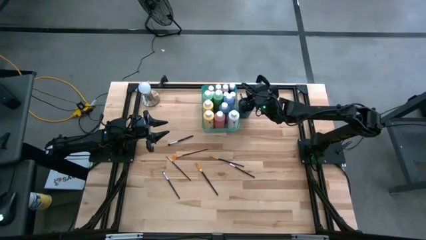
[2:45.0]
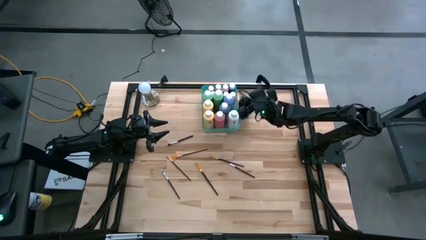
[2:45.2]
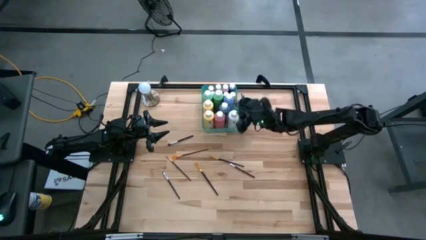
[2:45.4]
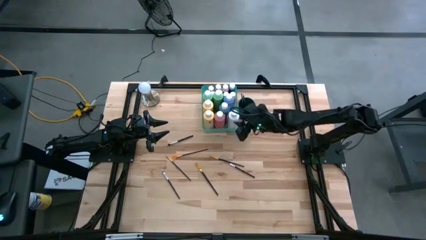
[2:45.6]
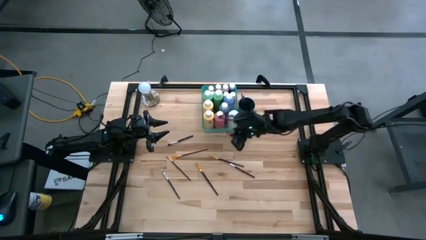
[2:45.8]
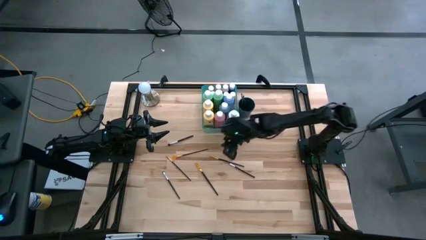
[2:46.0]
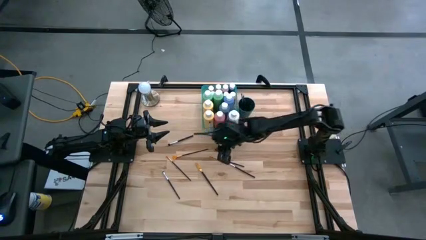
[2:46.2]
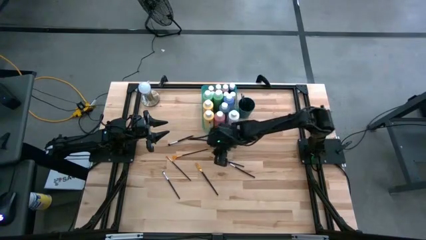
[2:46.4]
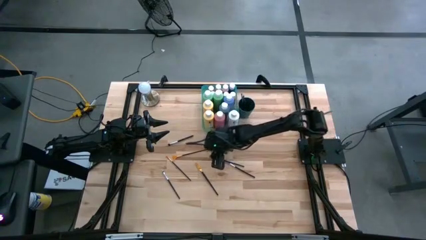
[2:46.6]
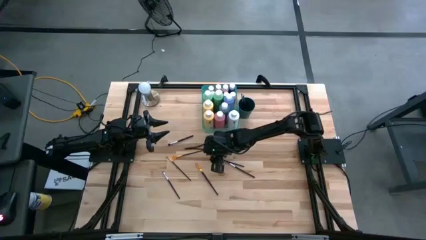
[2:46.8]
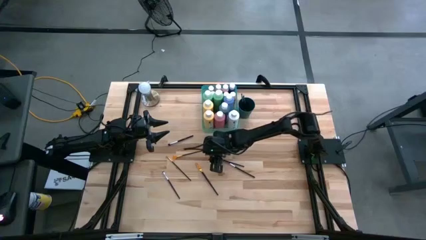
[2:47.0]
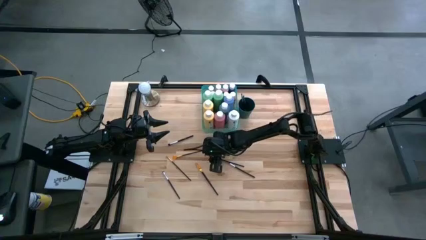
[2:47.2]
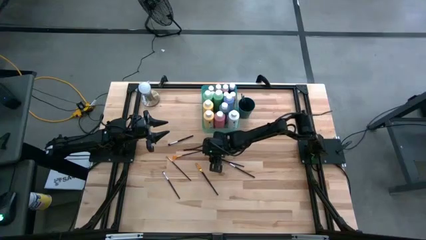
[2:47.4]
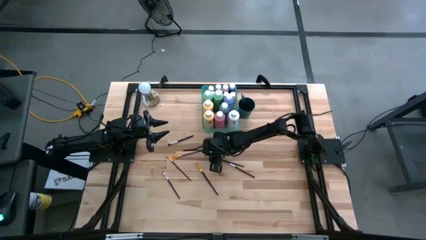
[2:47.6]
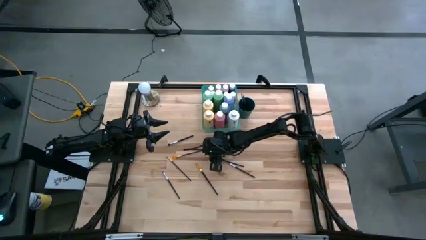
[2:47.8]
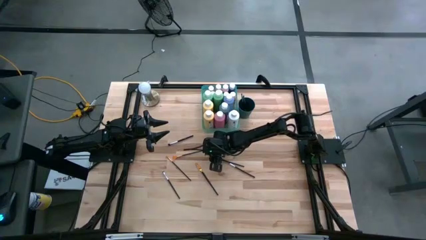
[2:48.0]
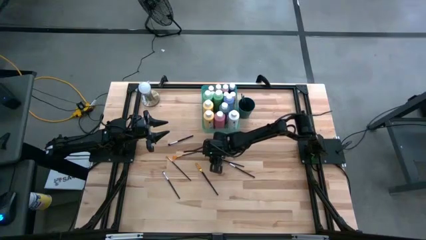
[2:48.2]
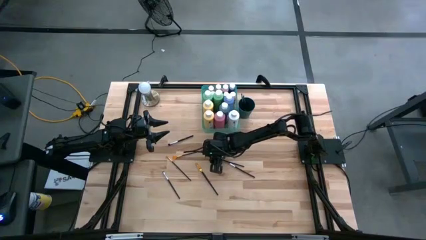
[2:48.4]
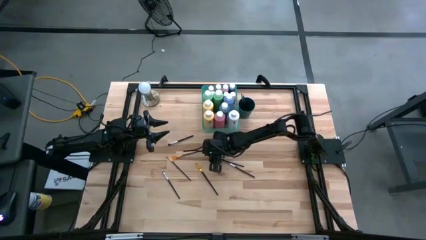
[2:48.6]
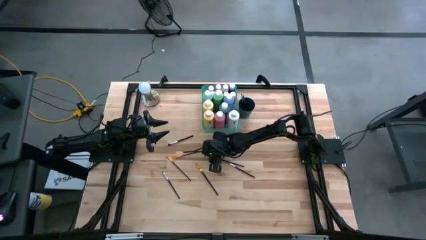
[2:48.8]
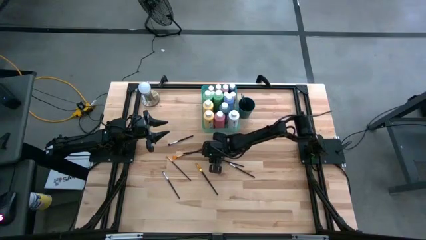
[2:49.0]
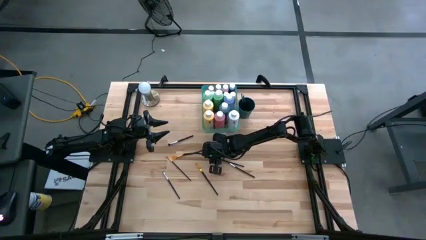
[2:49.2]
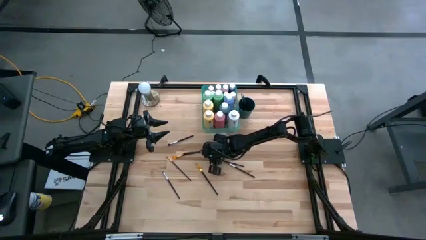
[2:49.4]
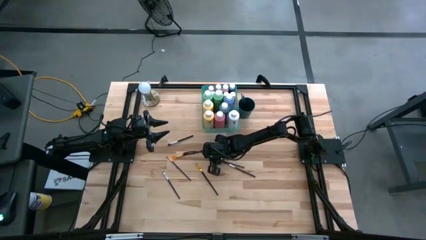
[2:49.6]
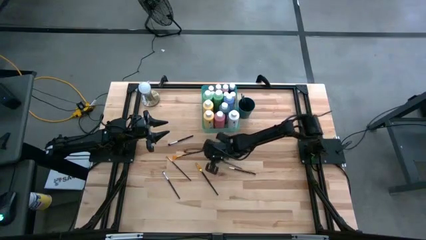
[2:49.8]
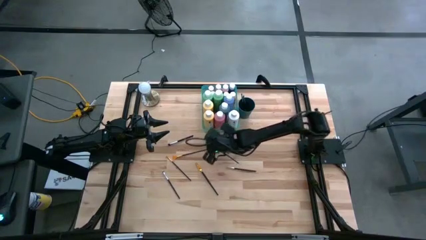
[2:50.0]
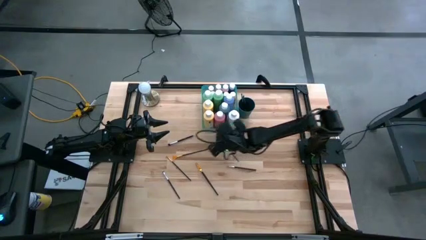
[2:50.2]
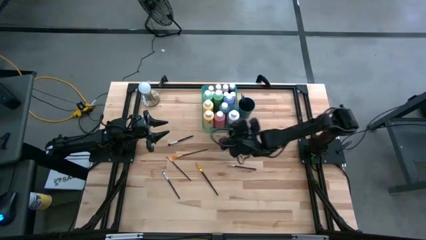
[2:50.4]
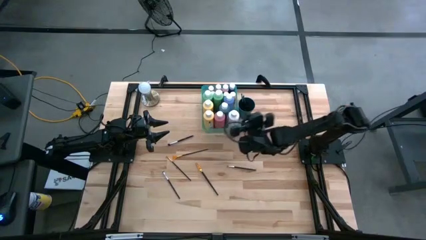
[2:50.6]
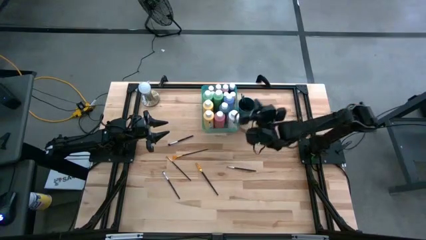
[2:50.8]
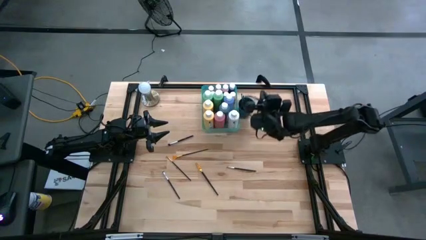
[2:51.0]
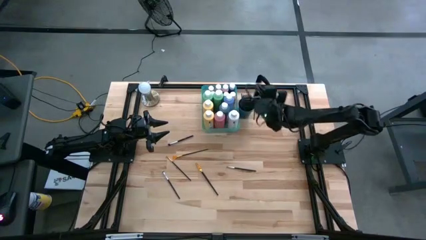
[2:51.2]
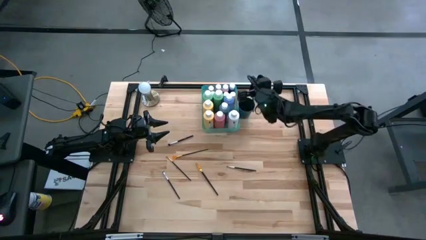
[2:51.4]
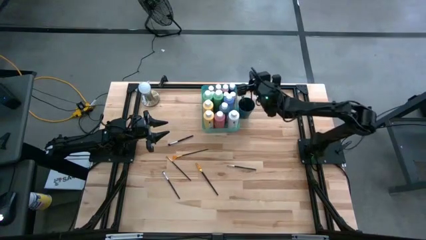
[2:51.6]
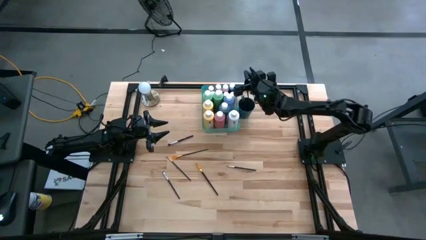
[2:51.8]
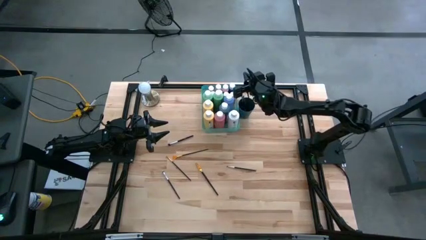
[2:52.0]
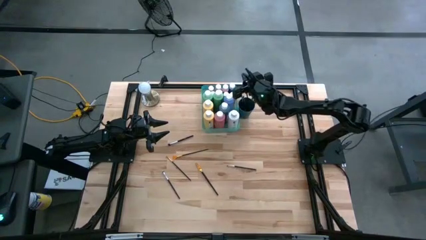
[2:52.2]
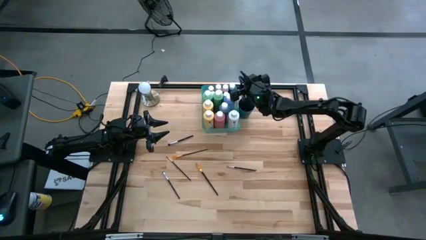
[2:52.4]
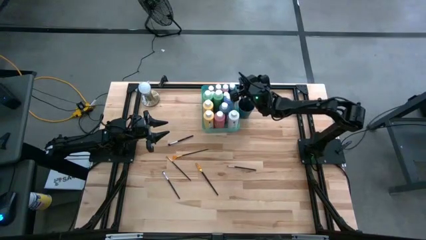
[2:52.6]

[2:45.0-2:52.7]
Task: Pick & Place Paint Supplies
Put the gold paint brush into the green cup

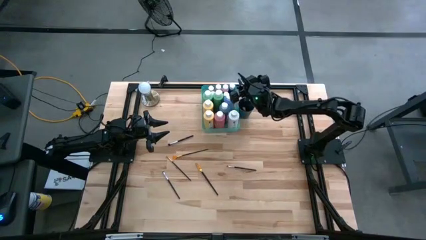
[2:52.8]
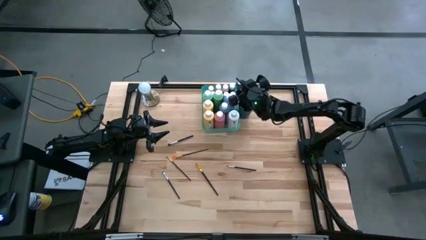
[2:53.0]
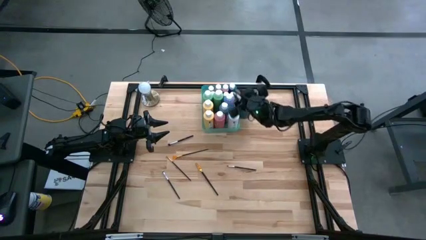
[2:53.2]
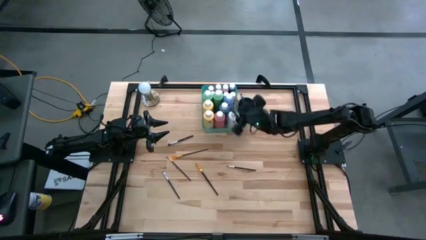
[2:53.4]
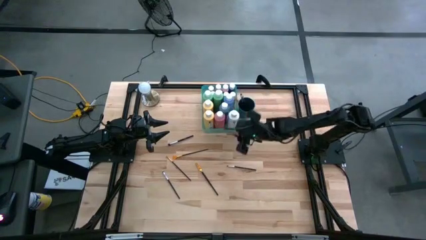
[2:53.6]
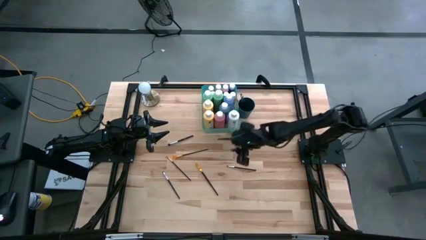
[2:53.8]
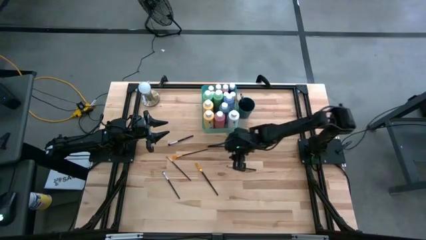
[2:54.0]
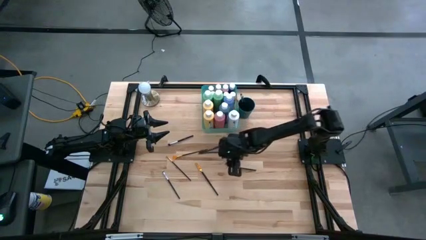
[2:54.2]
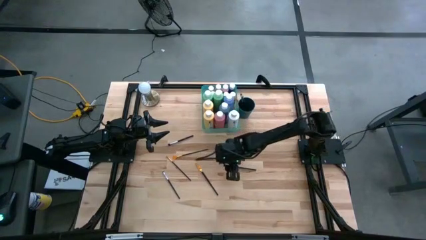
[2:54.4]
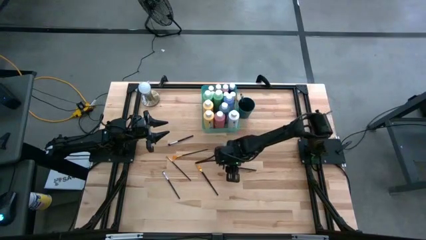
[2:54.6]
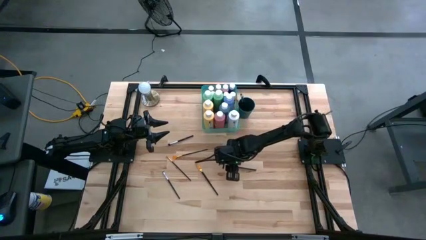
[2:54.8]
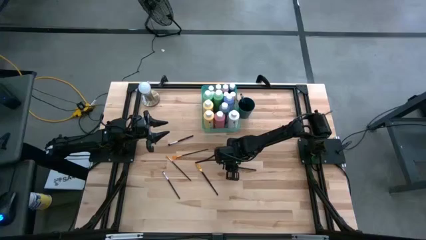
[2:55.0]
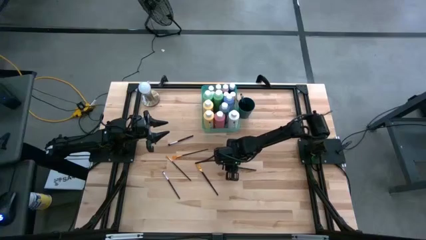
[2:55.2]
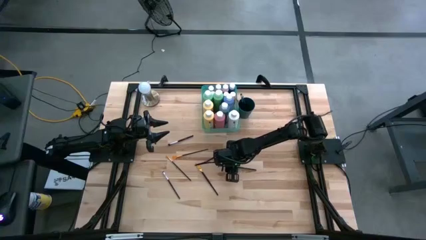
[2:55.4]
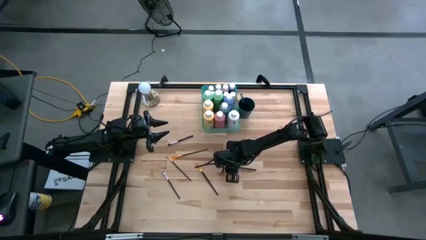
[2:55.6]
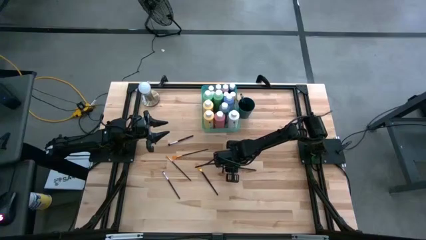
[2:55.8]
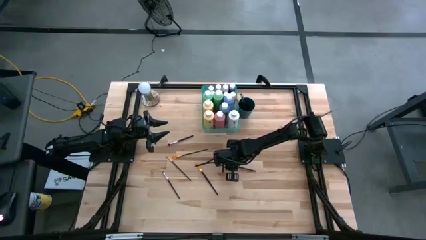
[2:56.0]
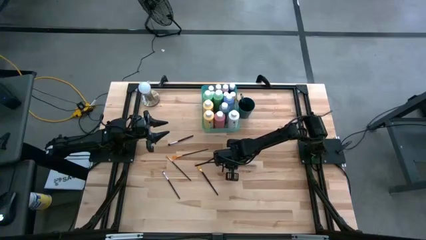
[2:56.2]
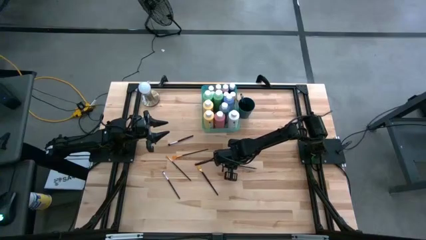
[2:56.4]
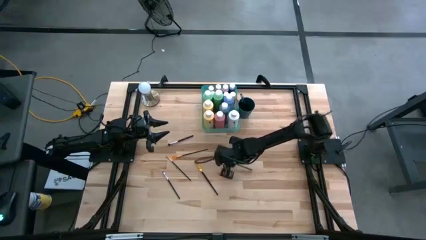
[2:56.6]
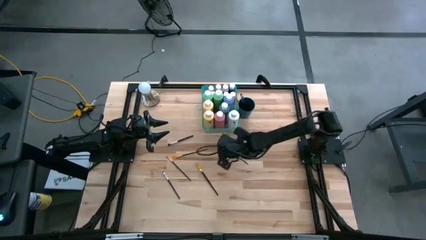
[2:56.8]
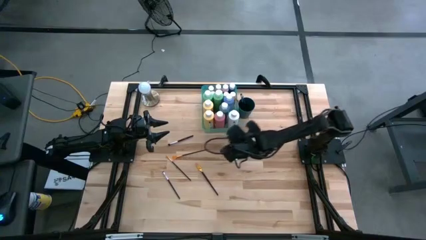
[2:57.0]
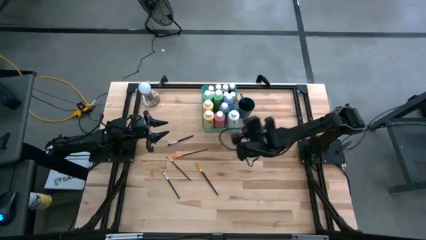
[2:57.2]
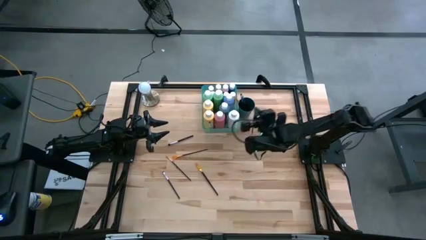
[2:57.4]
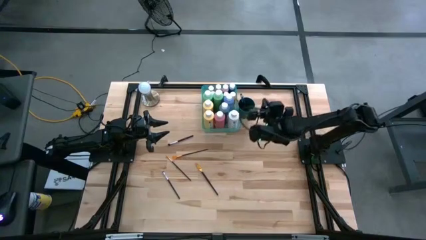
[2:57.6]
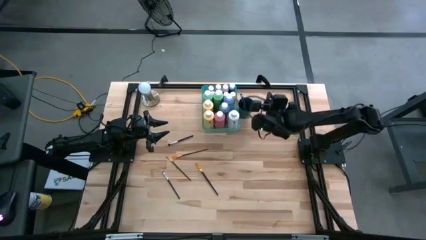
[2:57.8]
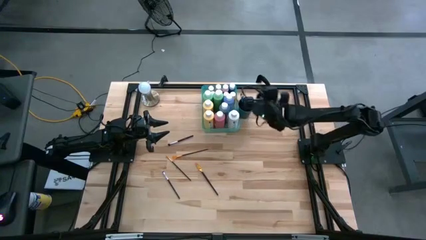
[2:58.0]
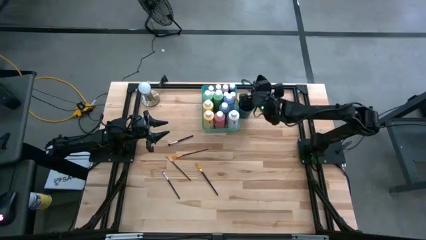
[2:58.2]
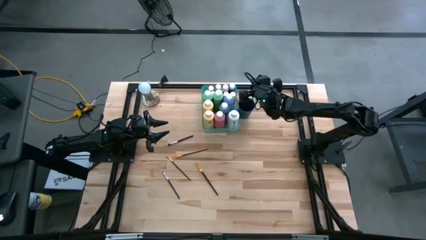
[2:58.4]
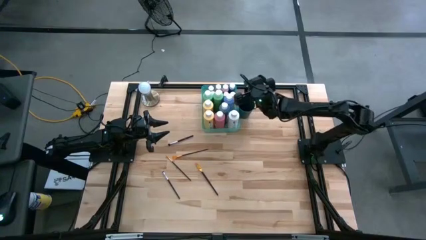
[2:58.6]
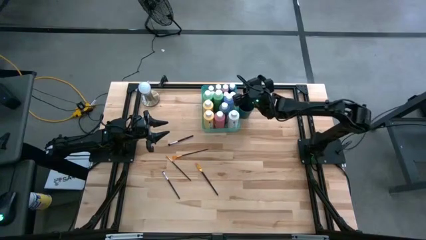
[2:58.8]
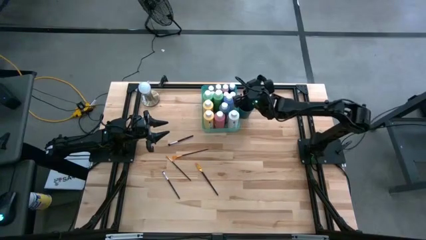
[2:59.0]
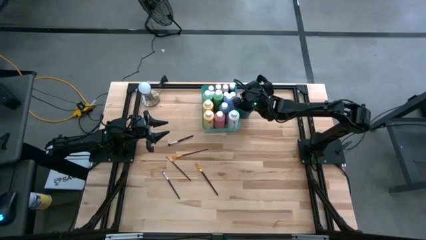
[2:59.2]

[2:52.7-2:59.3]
Put the silver paint brush into the green cup

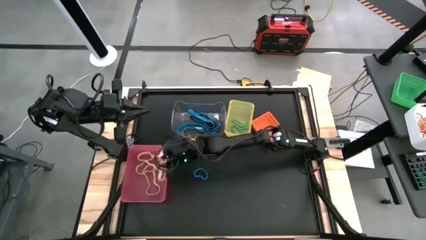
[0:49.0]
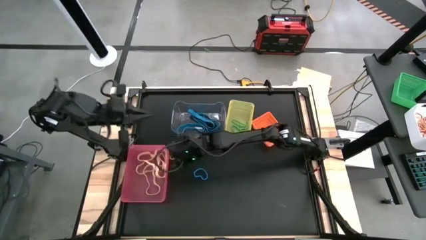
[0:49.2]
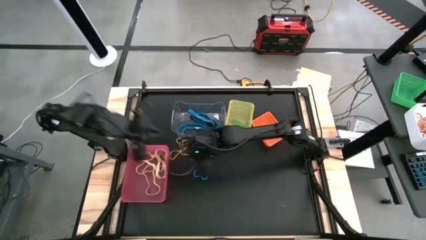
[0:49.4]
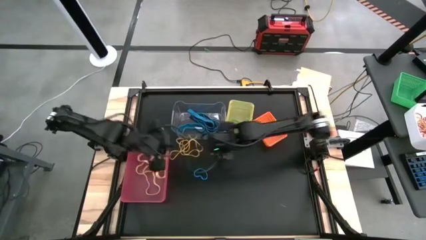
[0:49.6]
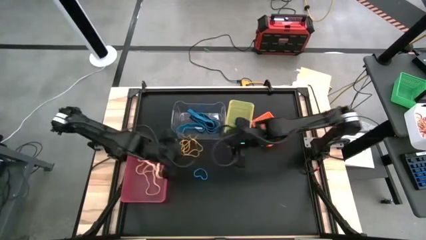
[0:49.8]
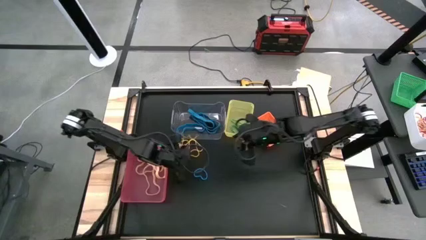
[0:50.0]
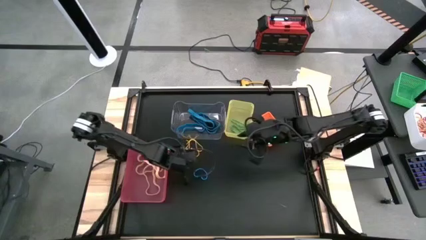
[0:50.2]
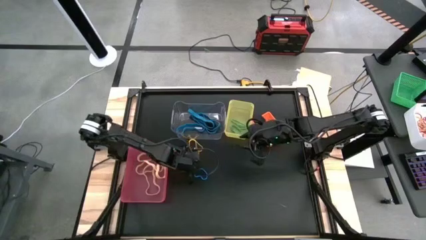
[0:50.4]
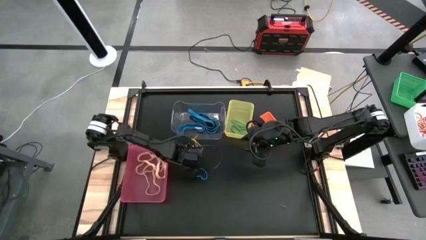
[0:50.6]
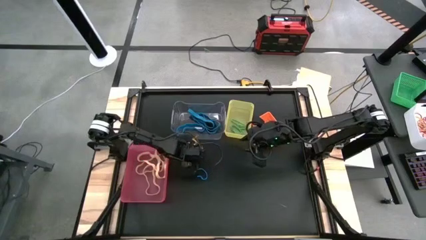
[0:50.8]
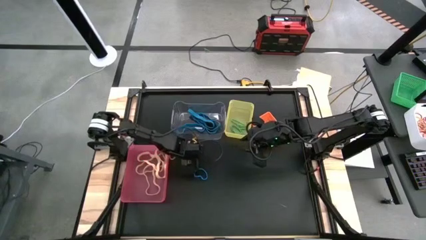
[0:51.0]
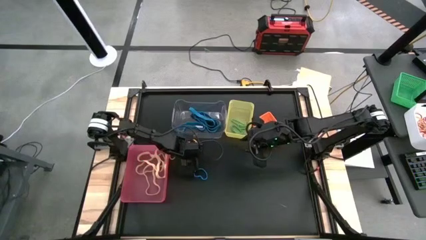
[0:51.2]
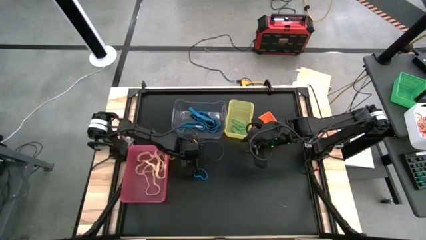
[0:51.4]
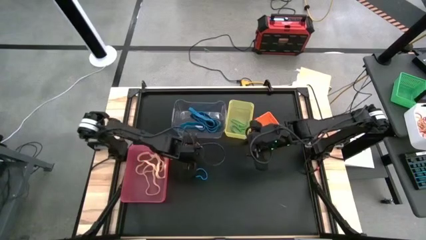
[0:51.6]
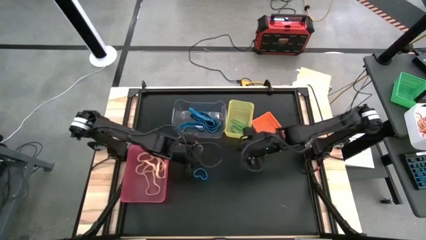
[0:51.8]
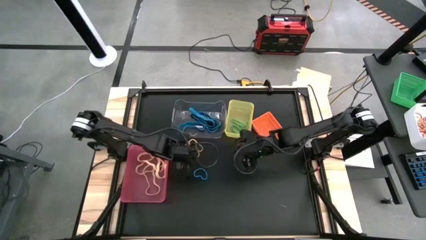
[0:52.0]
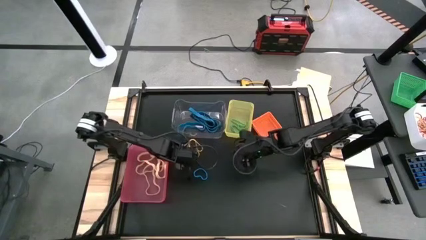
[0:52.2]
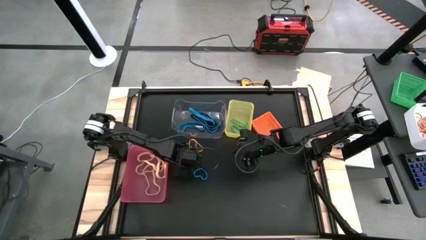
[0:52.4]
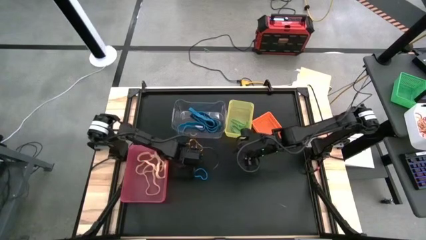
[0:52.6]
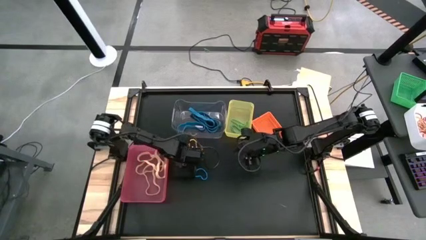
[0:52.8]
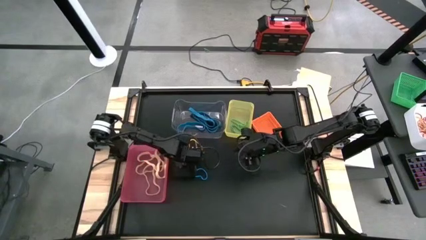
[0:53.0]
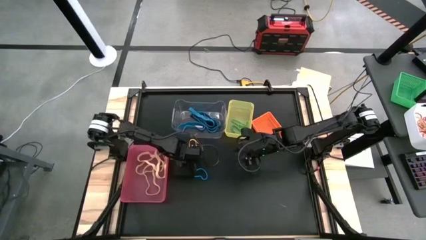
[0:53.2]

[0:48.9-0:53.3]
Task: Sort rubber bands into baskets
Put the yellow rubber band into the orange bin
